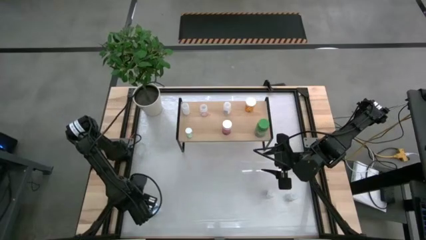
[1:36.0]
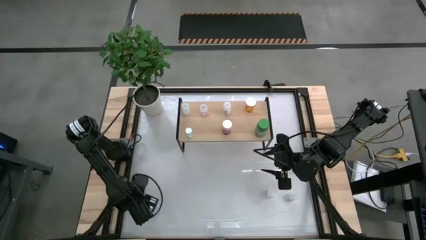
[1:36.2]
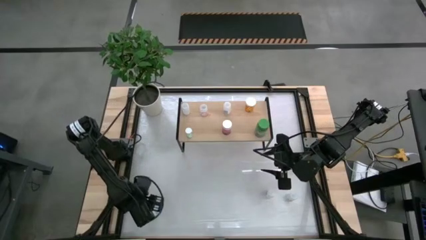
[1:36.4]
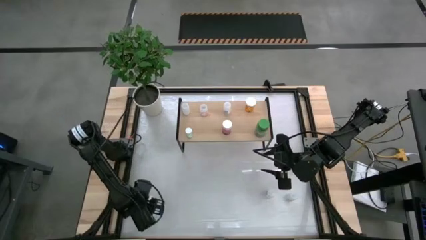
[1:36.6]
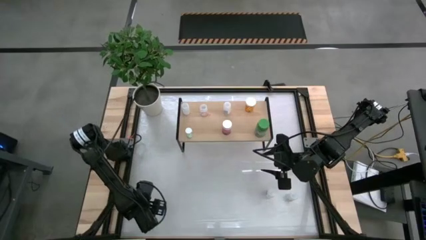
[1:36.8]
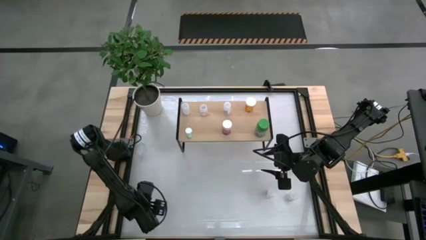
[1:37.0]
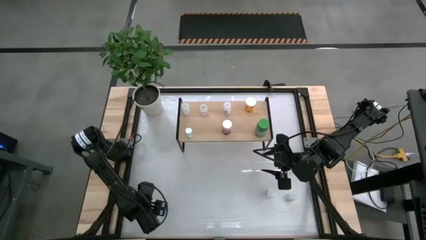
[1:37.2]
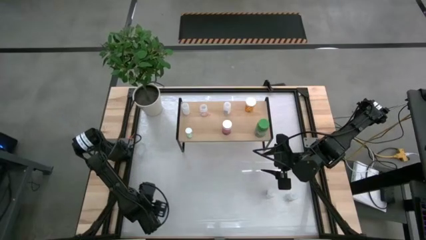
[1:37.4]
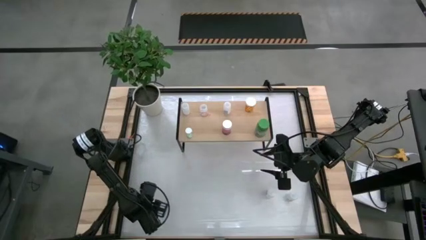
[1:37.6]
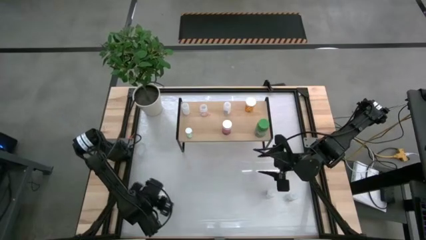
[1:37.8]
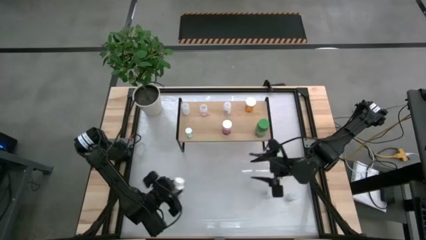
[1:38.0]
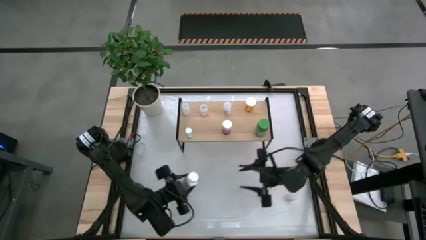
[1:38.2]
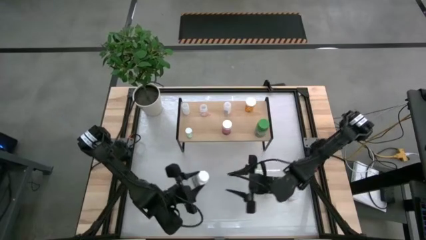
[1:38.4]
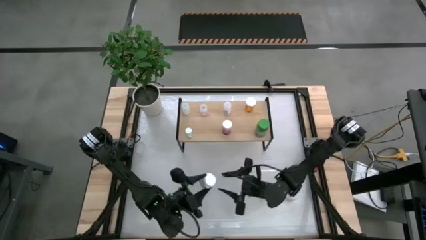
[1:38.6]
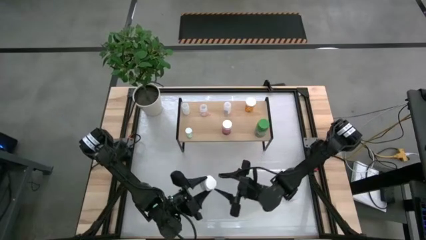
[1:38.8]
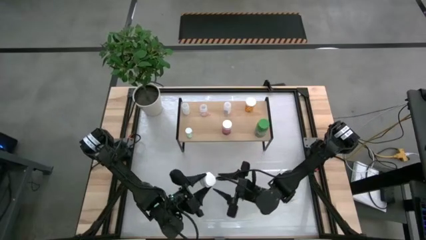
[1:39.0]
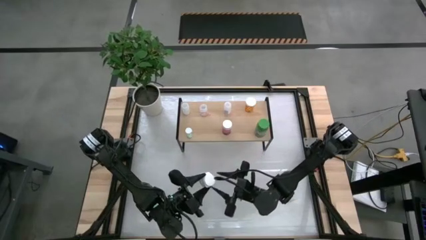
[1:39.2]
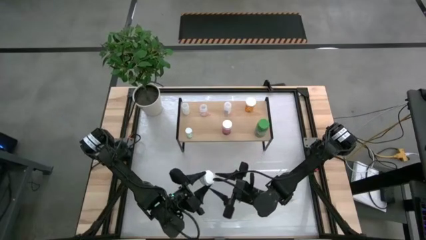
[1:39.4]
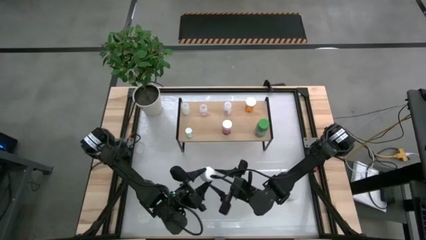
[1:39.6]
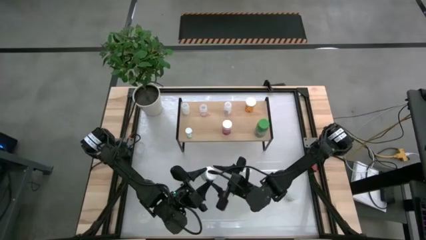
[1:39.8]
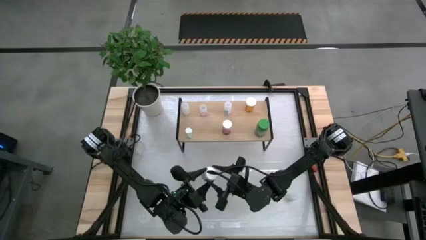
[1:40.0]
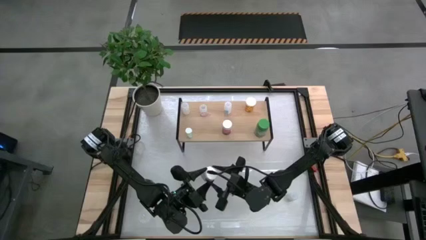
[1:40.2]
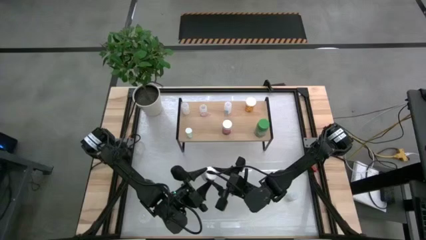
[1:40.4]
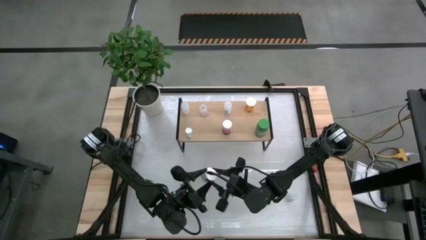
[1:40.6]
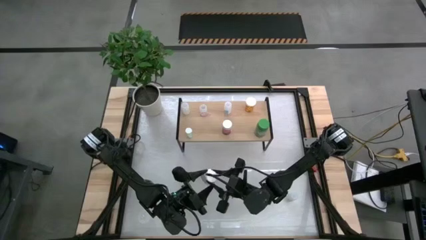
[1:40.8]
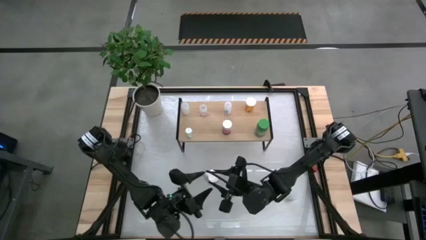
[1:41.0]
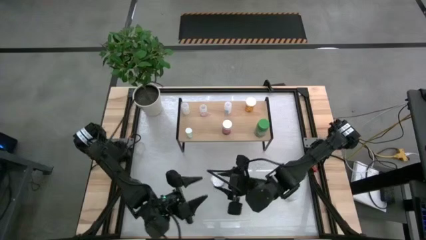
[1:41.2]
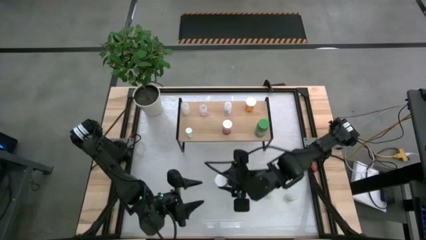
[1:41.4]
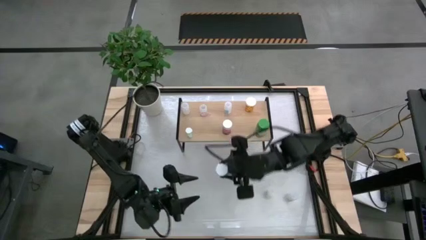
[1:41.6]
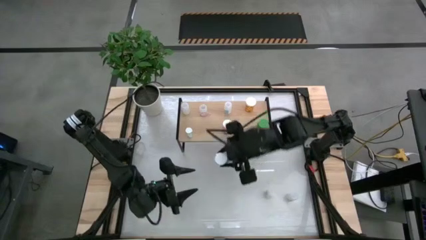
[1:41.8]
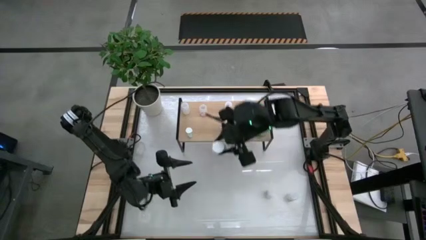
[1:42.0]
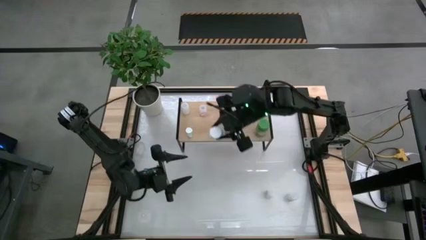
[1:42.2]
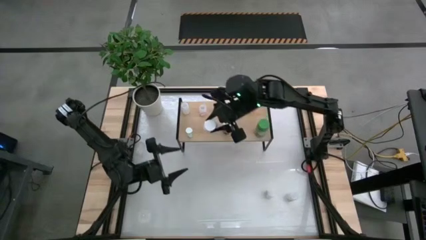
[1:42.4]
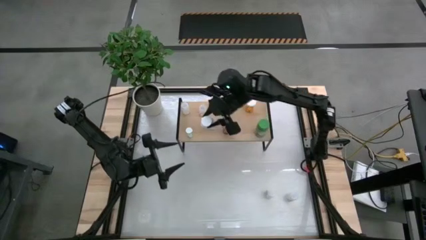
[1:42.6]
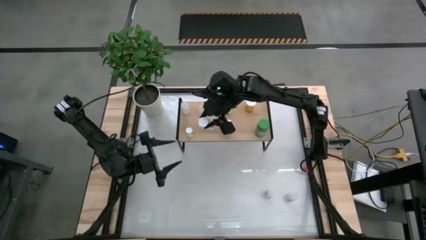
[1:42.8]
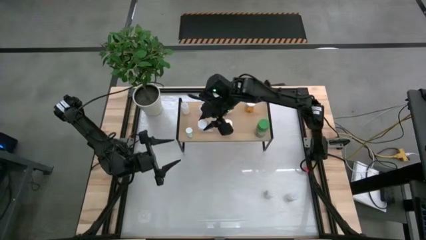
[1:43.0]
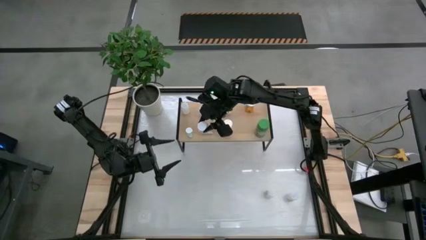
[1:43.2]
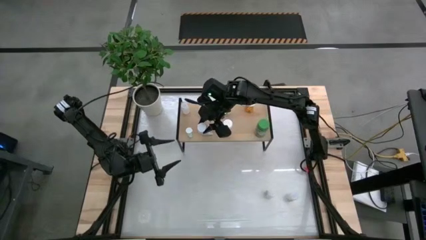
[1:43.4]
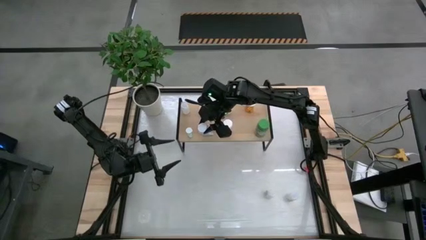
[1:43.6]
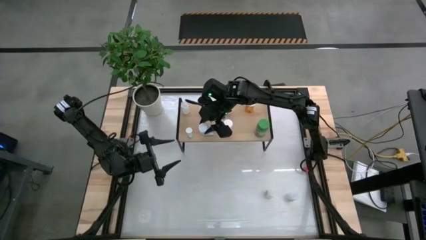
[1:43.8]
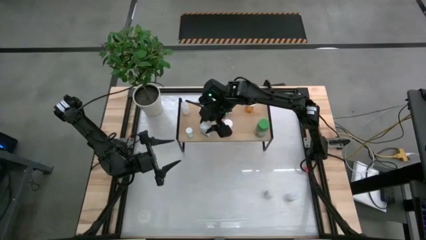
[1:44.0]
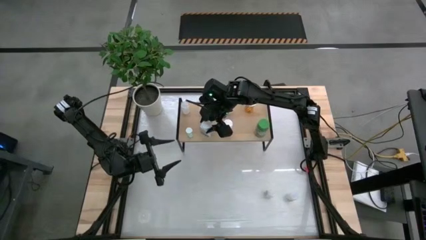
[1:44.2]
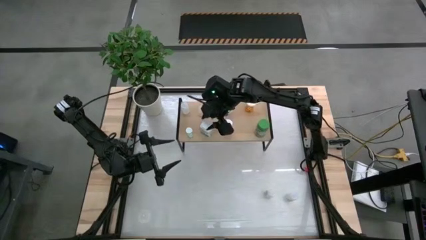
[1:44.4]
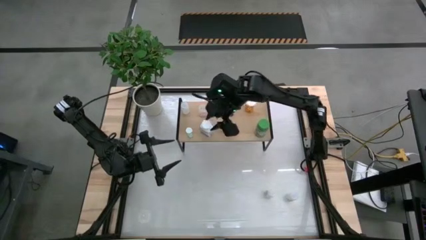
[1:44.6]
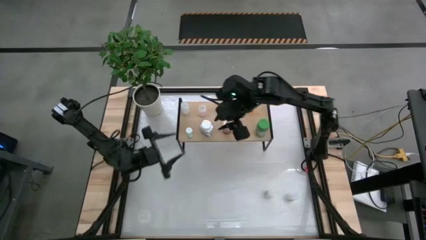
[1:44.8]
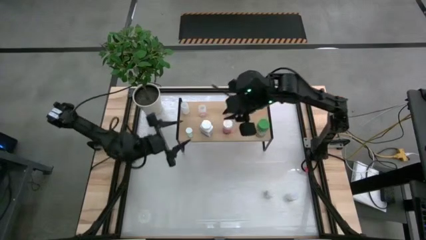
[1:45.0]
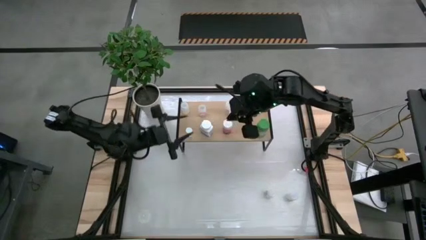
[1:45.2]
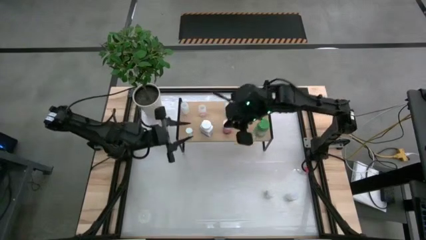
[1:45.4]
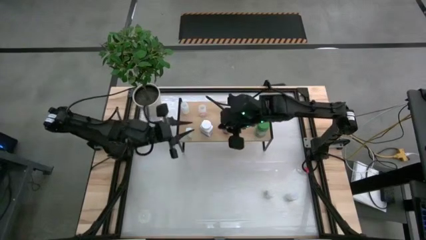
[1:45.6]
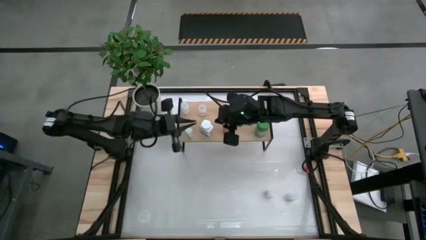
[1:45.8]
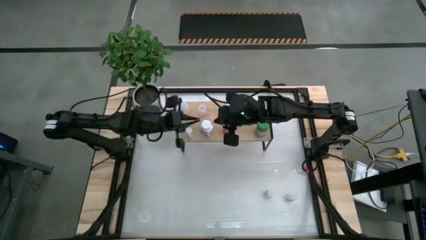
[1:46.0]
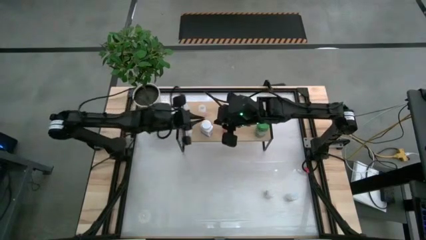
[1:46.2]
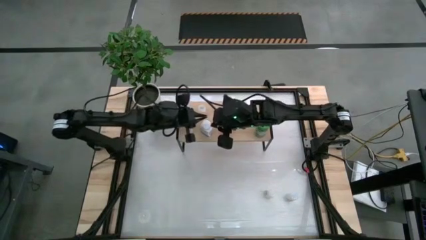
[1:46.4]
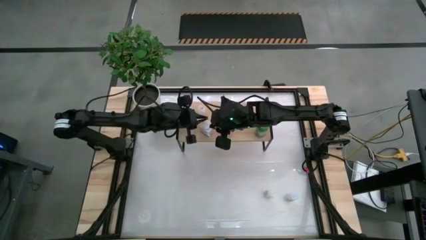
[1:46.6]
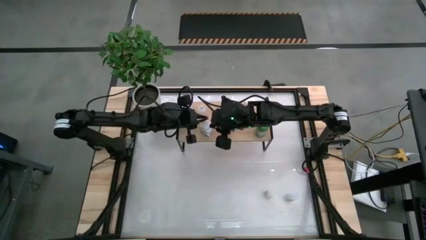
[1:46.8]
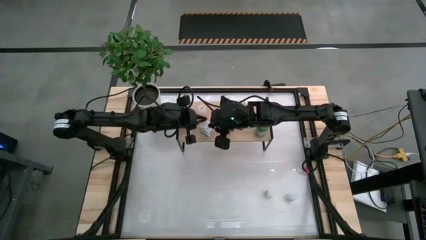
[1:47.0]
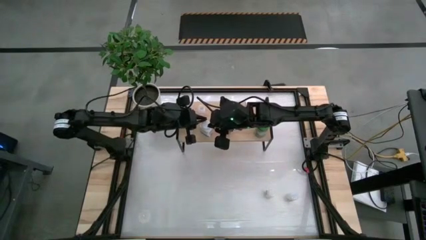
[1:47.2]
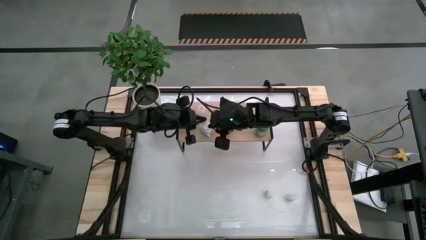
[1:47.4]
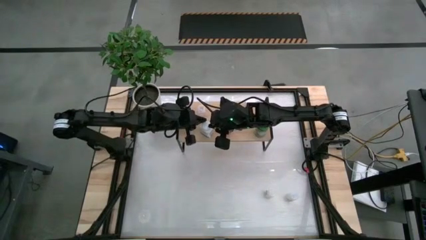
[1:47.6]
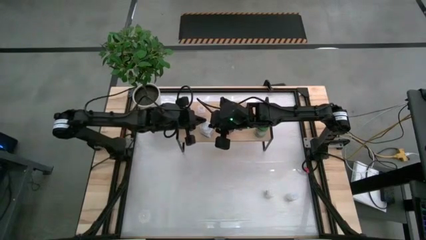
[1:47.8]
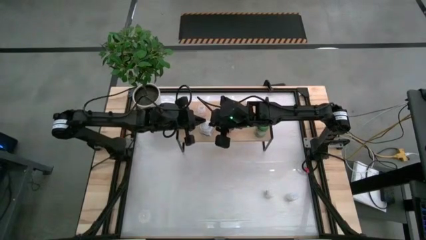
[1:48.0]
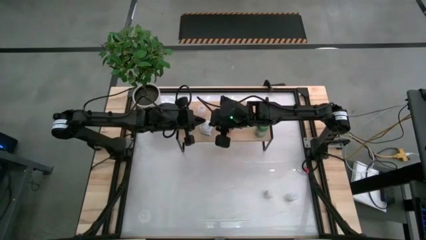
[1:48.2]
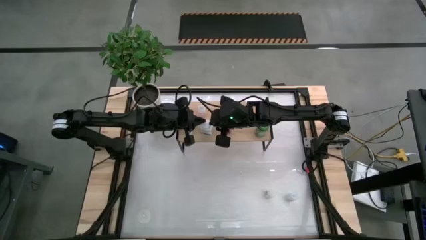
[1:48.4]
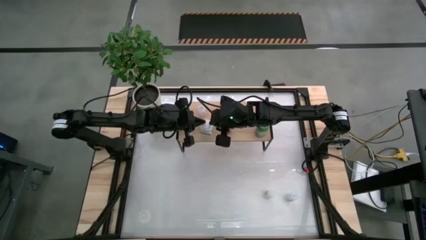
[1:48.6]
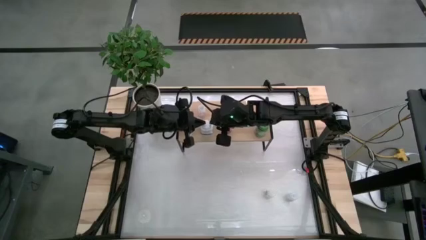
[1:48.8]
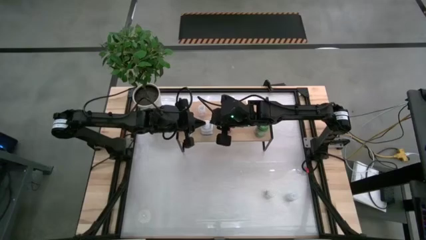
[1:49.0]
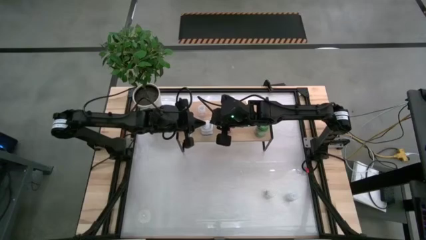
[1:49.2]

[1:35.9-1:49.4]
Task: Pick and place medicine bottles onto shelf by color
Put the white pill bottle on the shelf

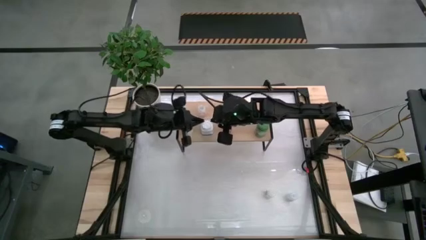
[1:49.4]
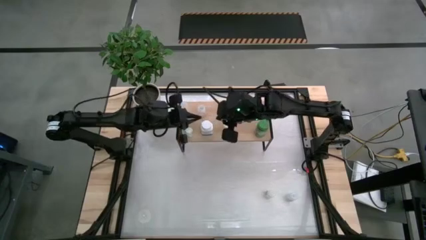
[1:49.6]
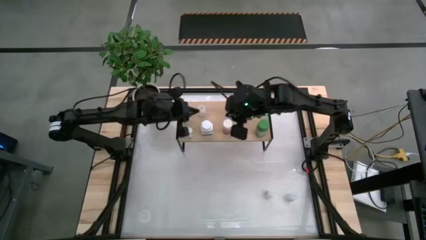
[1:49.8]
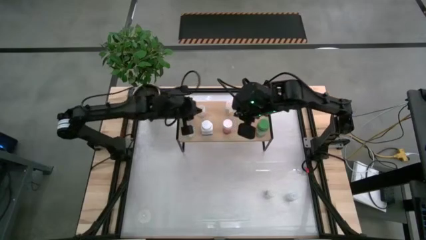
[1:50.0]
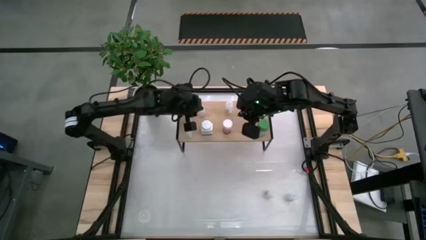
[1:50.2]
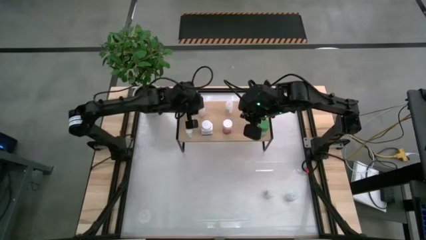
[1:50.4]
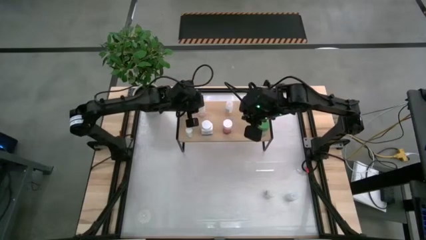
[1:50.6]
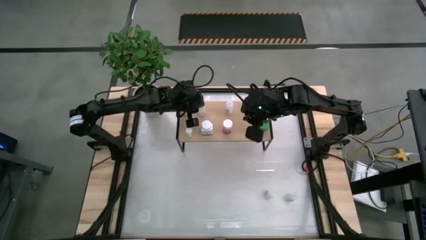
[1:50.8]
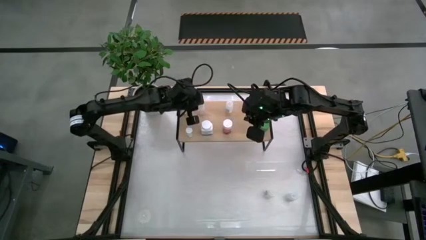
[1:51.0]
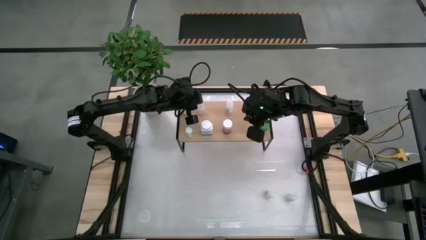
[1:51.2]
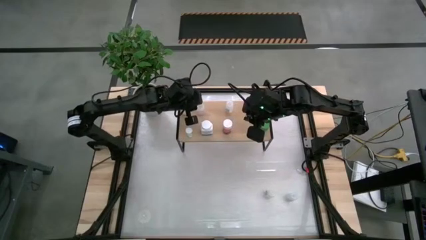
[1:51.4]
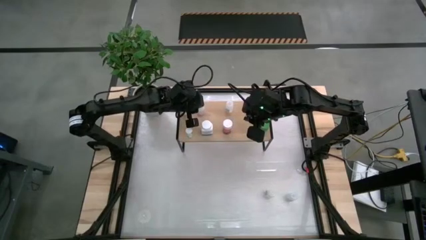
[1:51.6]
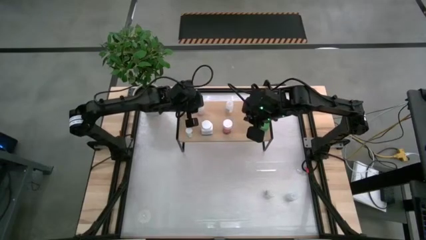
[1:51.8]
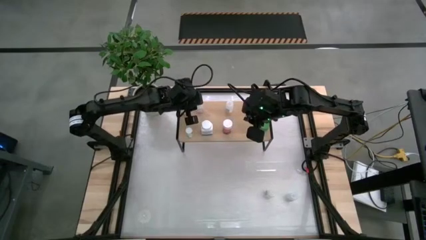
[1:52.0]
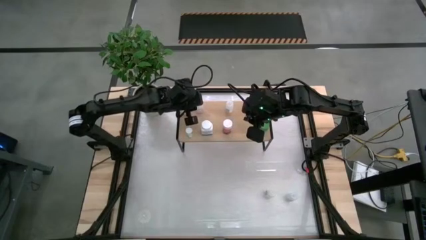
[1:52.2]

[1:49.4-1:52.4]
Adjust the transparent pill bottle on the shelf
